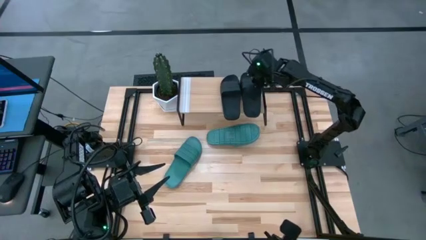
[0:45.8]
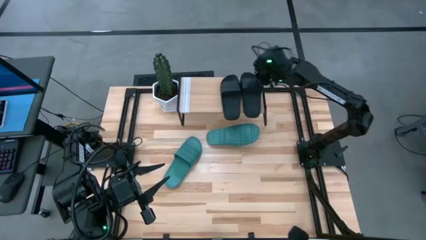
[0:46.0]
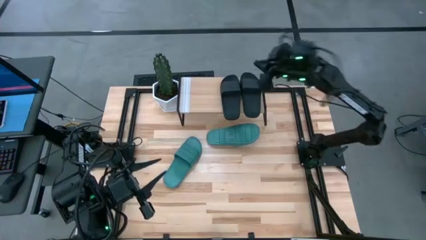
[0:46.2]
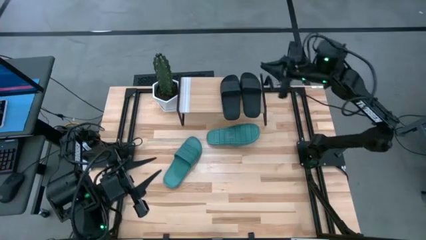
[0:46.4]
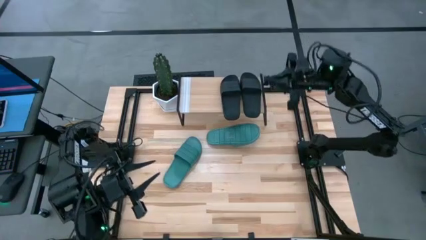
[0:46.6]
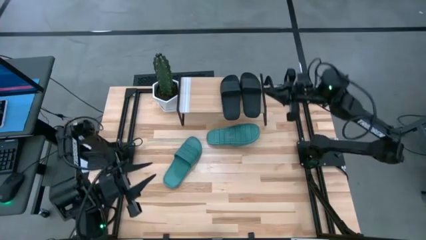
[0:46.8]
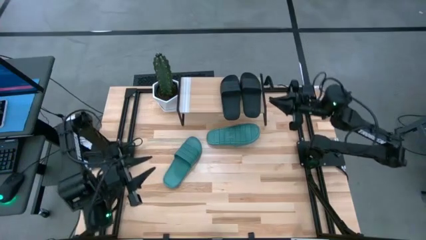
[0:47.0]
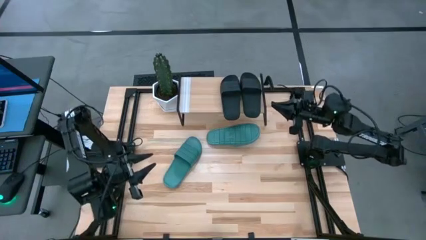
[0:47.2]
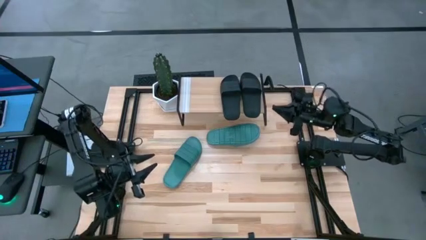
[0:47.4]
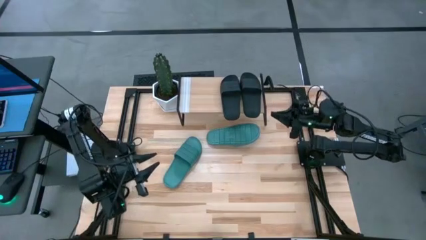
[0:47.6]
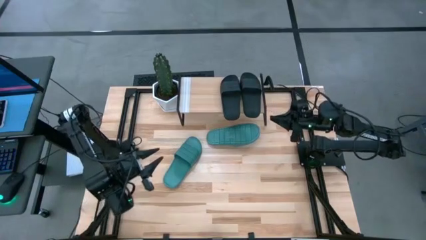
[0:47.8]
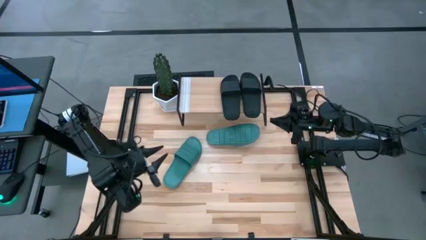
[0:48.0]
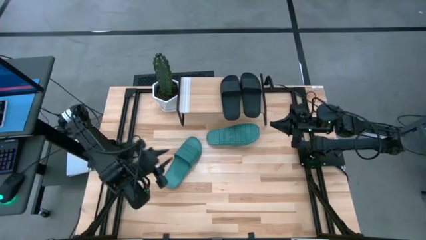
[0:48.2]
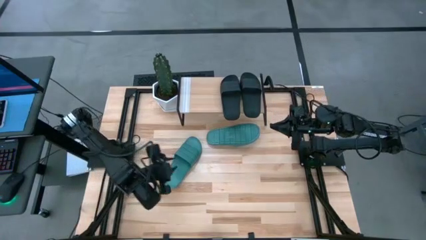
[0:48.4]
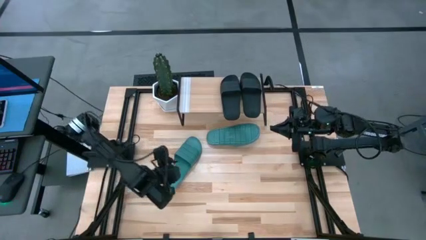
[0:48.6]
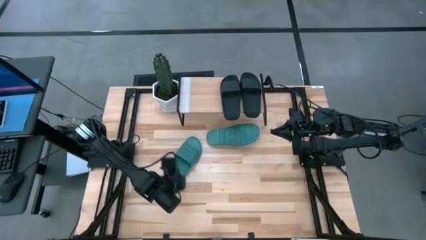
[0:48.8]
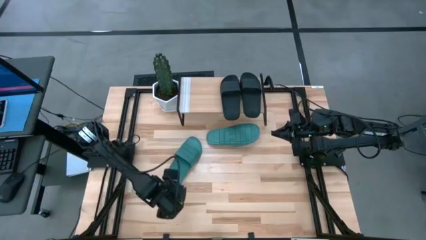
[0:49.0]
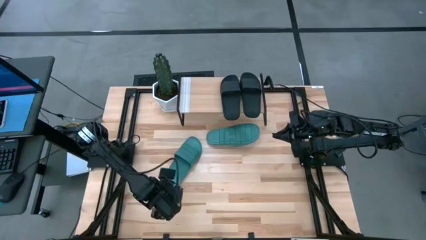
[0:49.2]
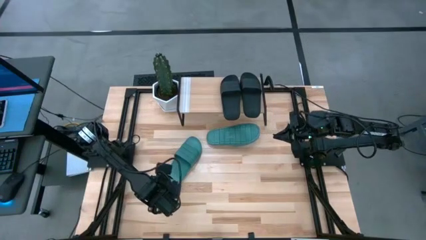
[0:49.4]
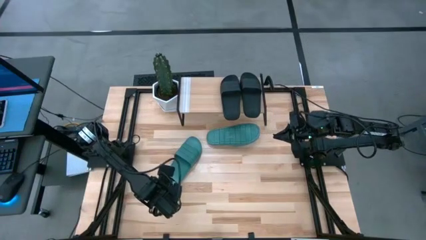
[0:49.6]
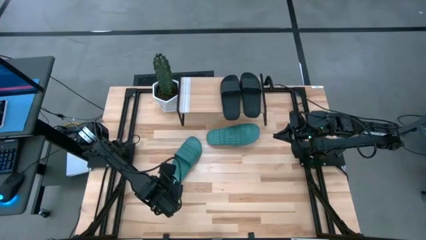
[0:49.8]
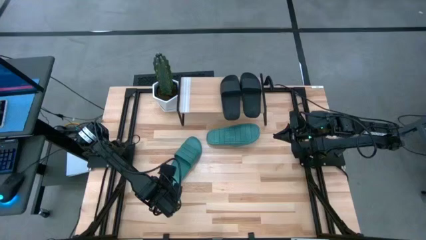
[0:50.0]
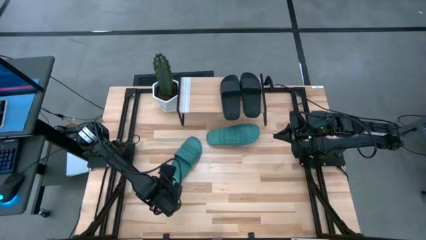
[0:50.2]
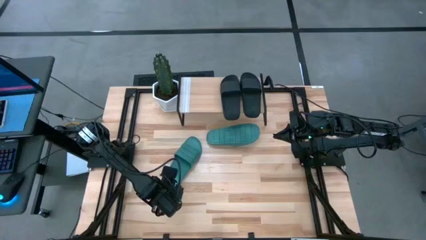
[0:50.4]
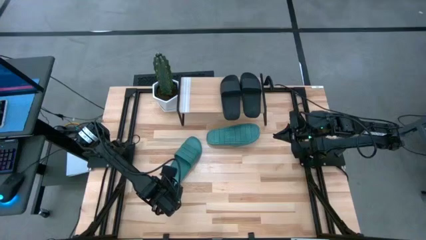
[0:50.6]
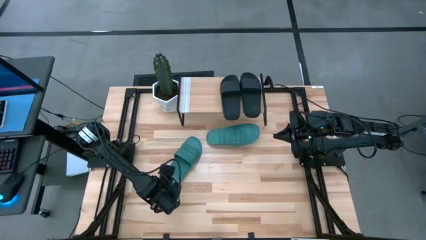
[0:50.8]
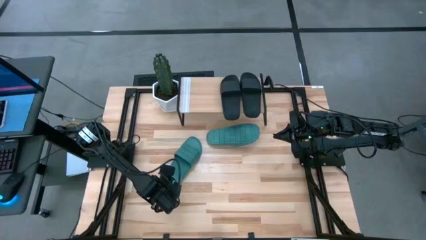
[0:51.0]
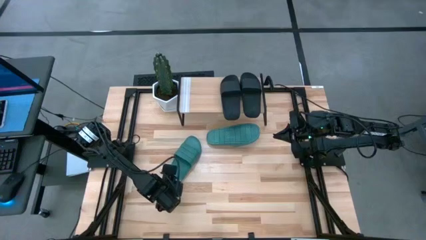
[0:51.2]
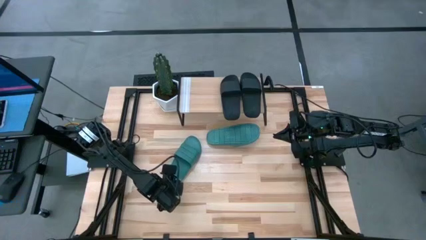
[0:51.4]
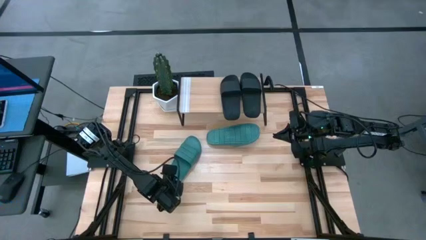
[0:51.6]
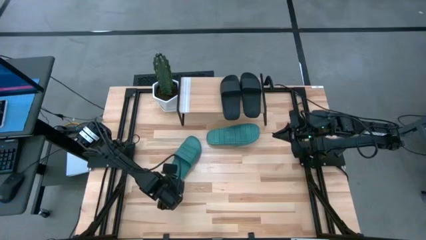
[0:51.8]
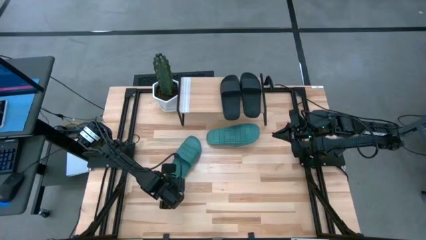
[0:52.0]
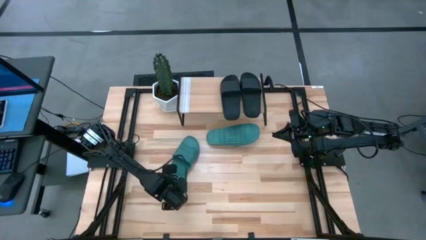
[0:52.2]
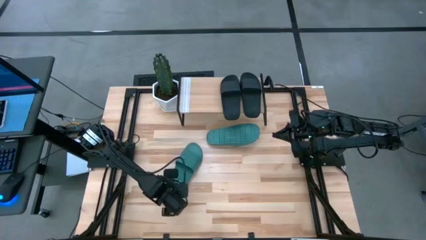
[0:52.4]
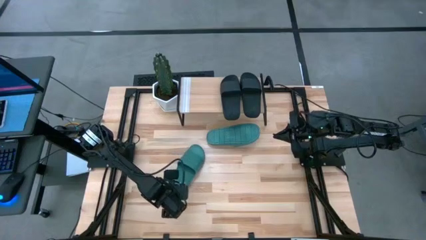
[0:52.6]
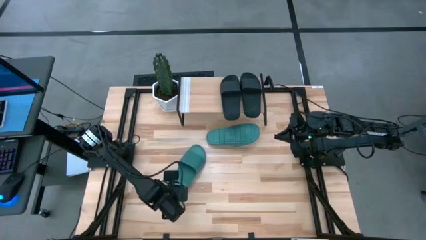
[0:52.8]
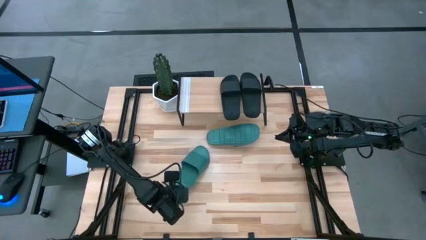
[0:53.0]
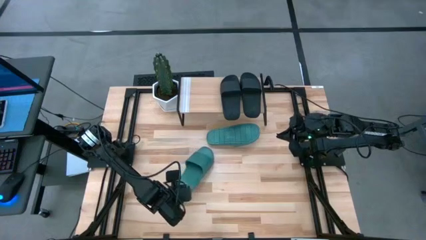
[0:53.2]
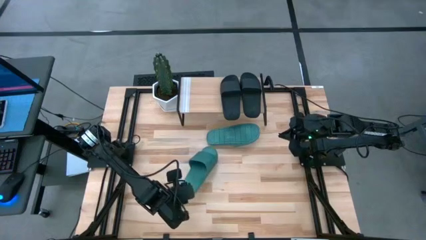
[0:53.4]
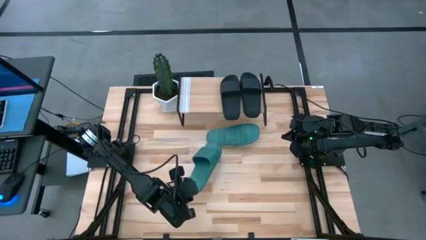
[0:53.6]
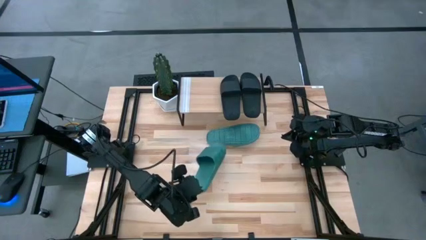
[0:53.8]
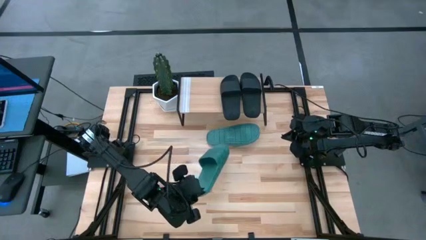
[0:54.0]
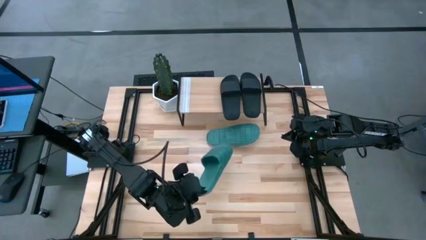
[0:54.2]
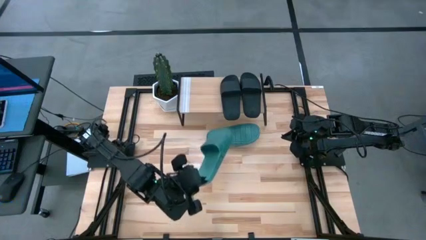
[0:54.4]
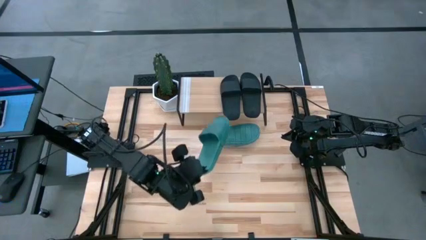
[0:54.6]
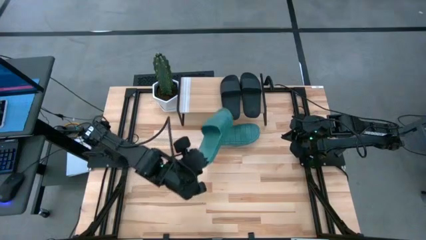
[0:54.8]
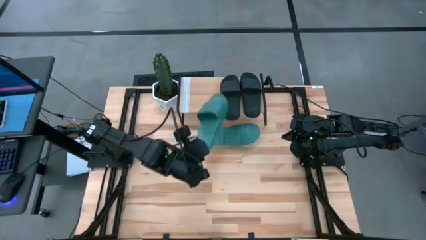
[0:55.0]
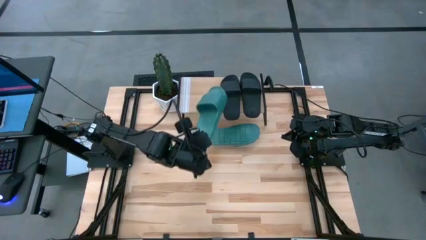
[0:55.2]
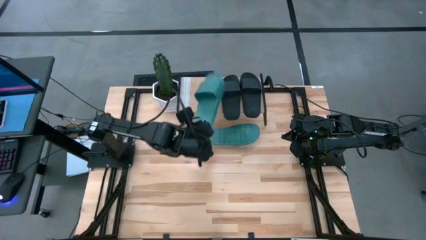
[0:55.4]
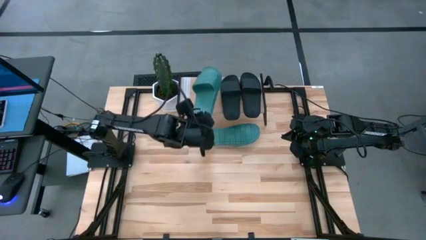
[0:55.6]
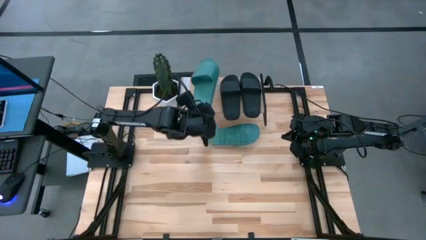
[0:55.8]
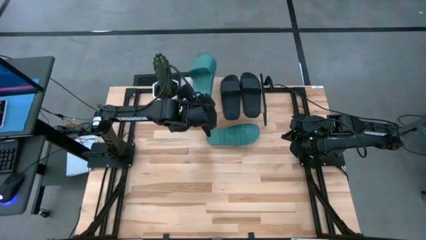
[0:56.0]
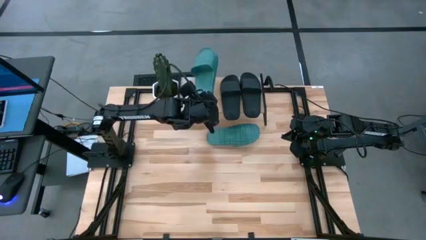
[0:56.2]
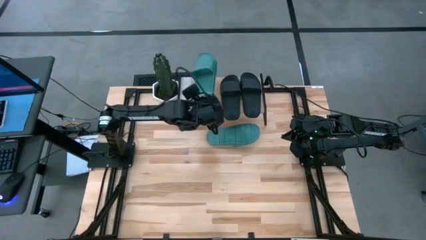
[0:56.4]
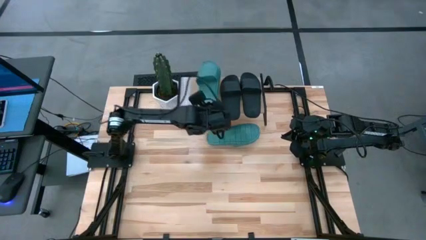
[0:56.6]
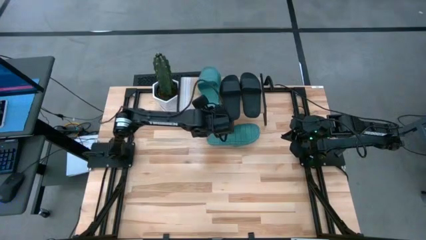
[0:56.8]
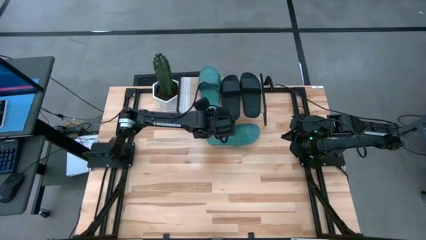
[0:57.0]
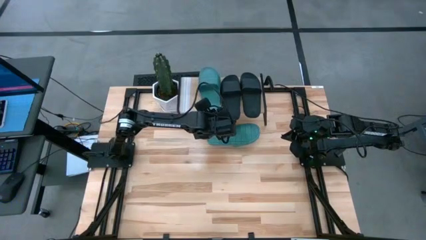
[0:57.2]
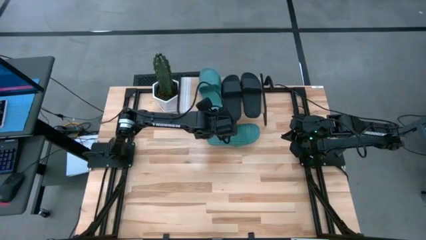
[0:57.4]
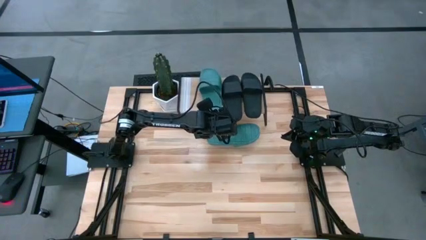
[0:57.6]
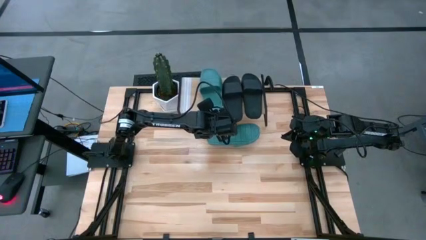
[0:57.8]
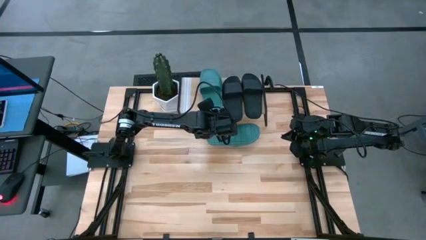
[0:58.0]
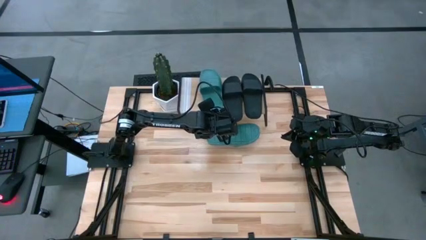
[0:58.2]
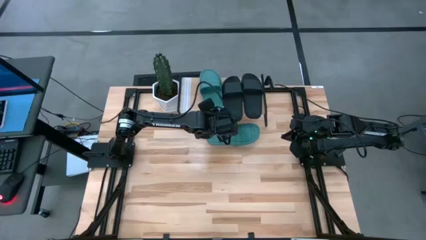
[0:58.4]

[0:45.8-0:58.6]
Task: Pick and place slides into the shelf
Put the bottom green slipper on the shelf

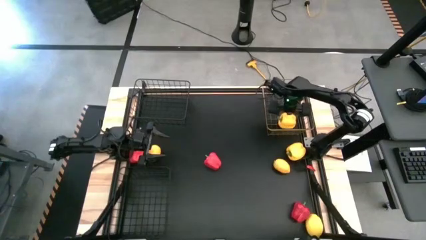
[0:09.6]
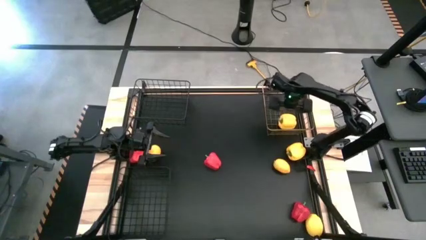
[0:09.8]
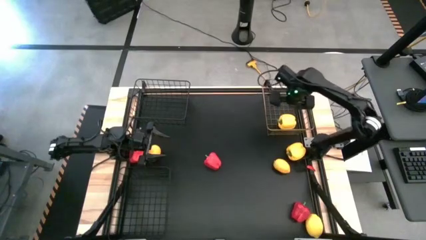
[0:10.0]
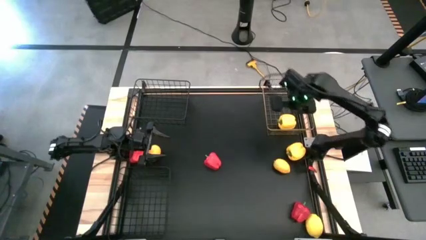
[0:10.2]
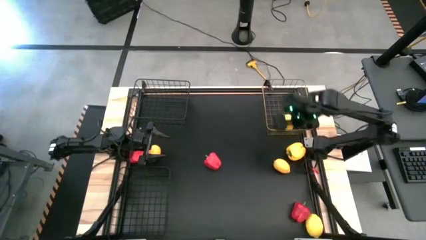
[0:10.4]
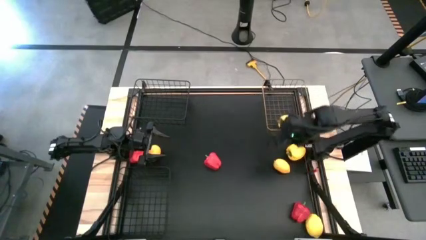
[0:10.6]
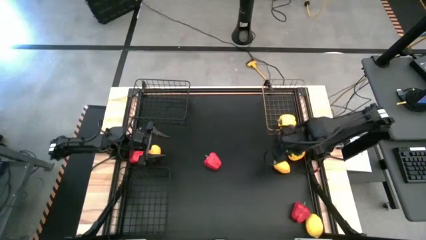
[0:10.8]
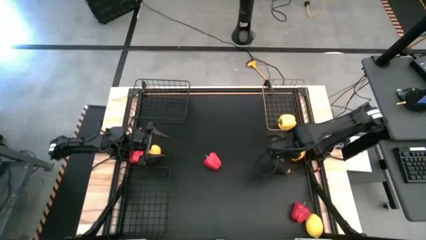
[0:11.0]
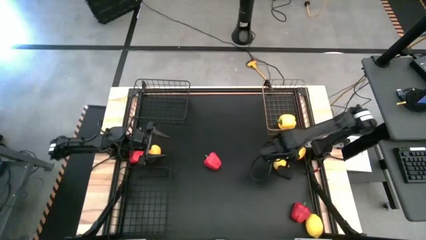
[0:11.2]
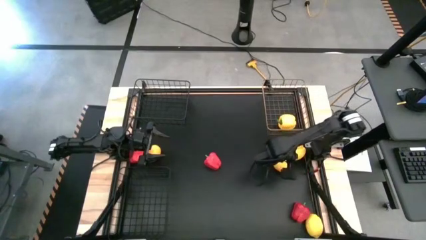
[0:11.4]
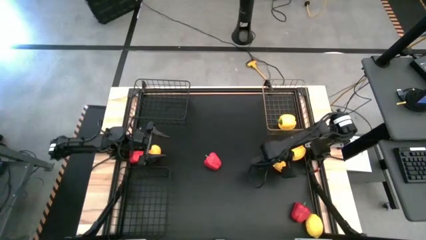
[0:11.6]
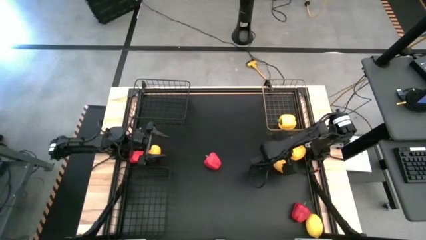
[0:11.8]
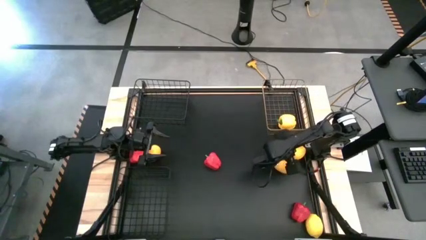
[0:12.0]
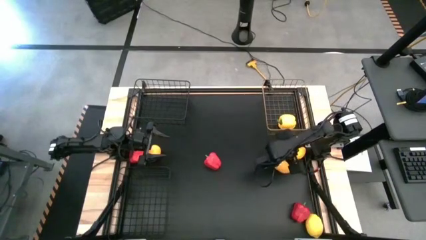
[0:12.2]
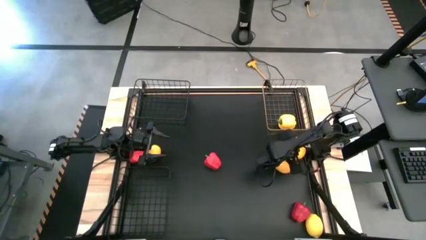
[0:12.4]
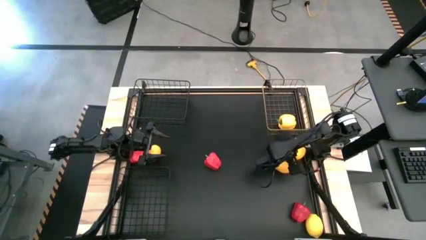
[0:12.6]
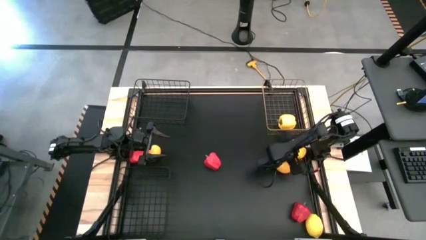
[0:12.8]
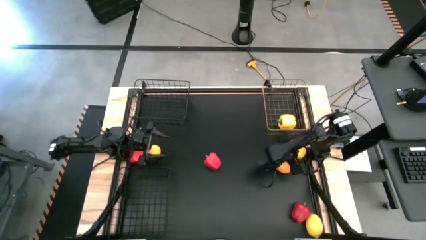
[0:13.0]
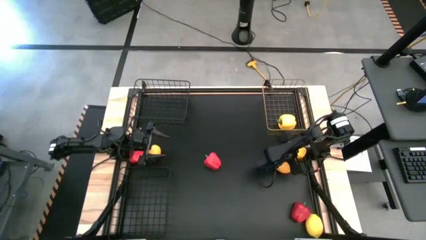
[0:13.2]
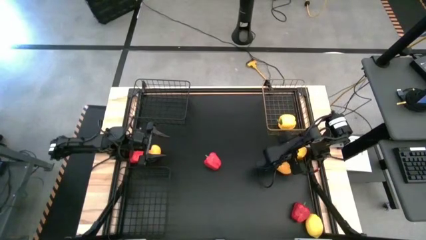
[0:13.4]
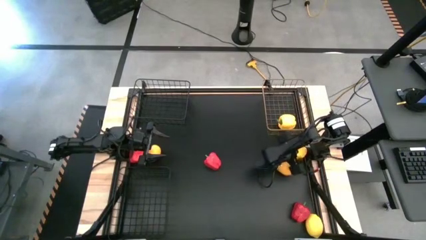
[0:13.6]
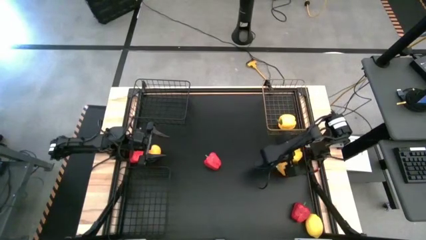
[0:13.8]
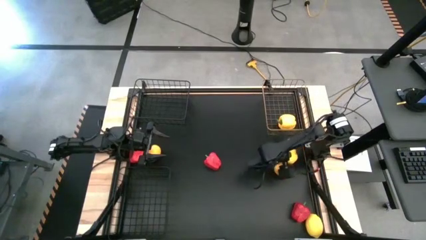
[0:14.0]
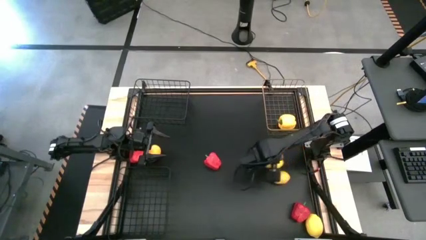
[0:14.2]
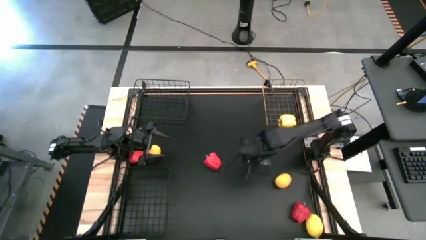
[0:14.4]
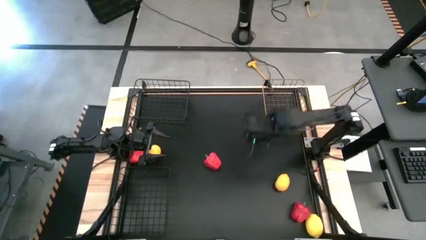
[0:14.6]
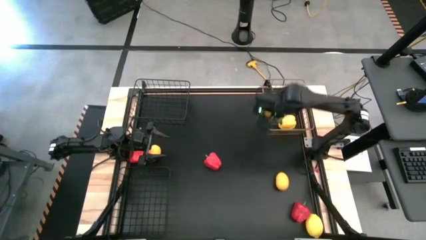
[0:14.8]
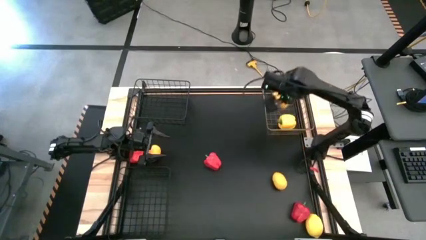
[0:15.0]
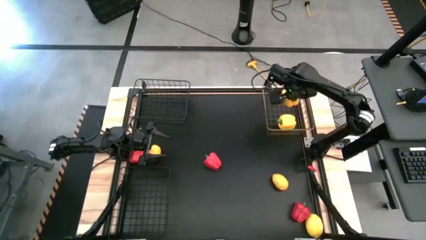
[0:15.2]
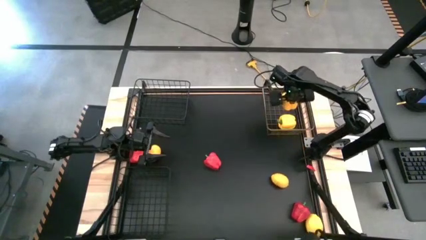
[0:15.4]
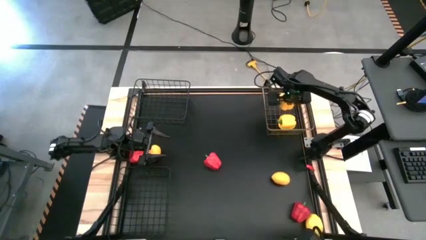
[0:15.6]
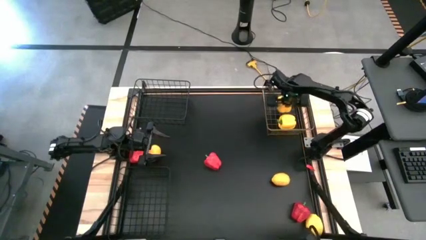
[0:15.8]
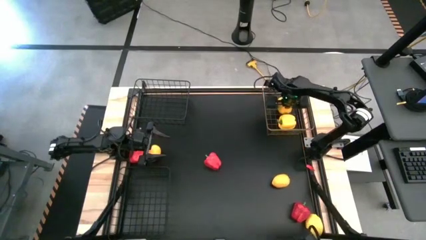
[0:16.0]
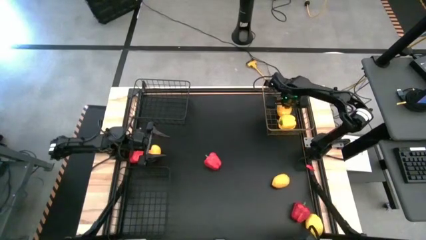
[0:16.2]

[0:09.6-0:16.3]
Task: Sort produce into baskets
Put the yellow bell pepper into the gold wire basket
